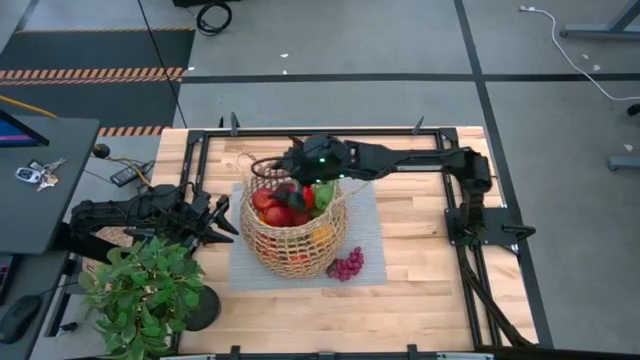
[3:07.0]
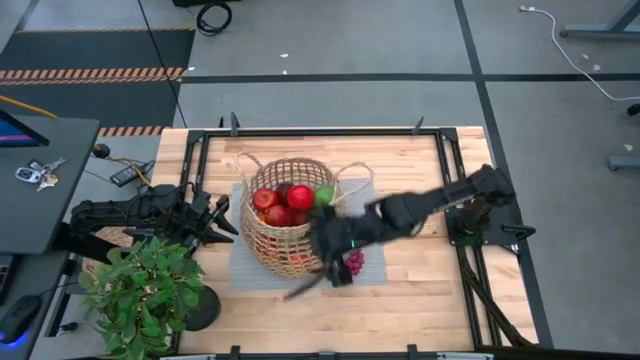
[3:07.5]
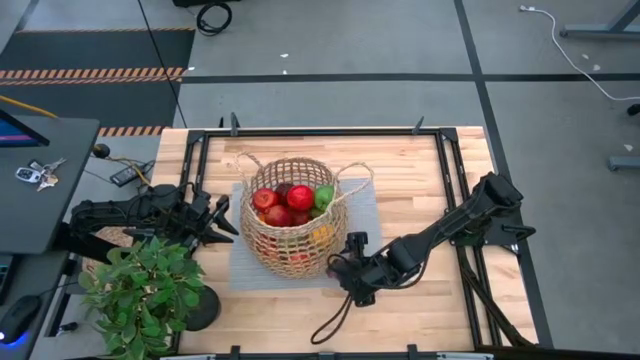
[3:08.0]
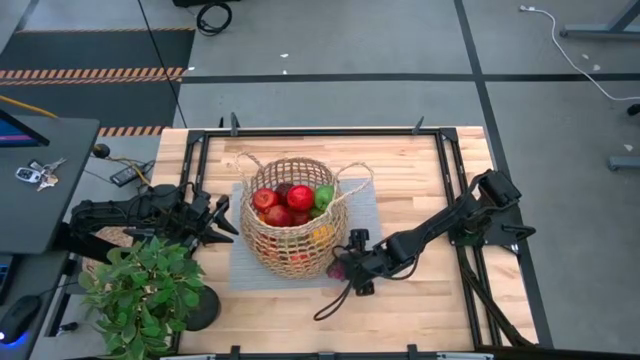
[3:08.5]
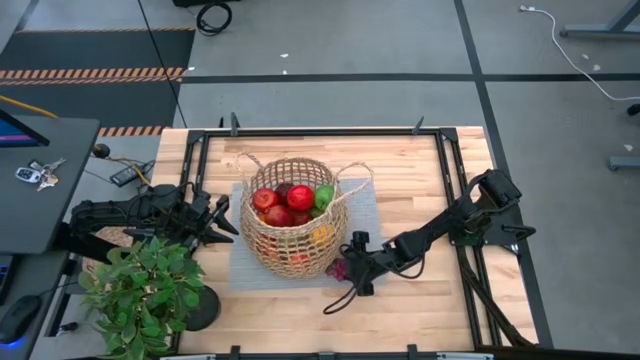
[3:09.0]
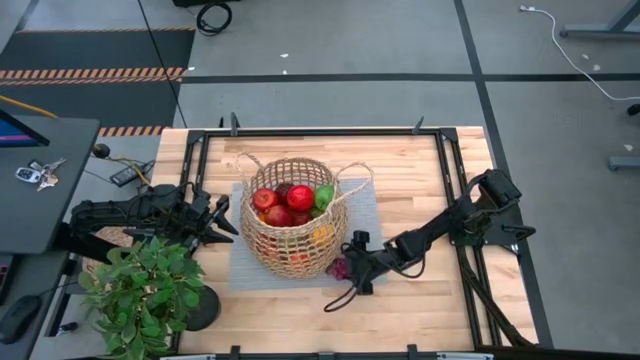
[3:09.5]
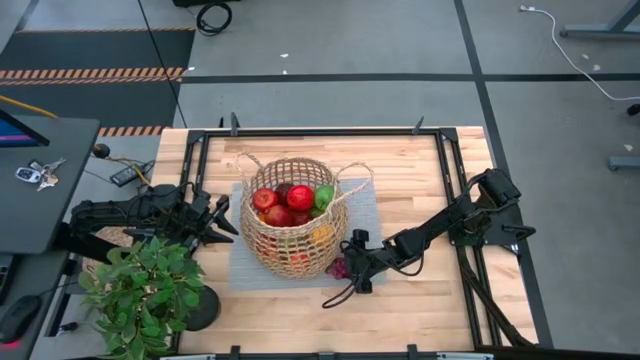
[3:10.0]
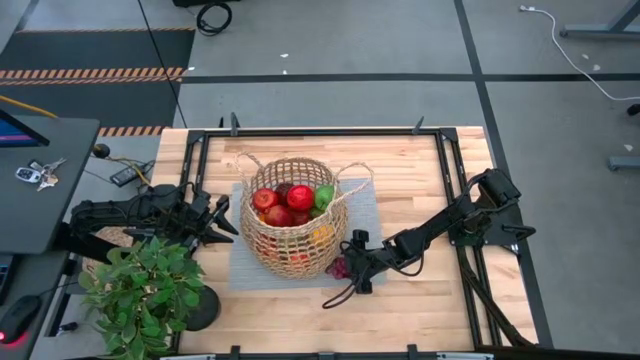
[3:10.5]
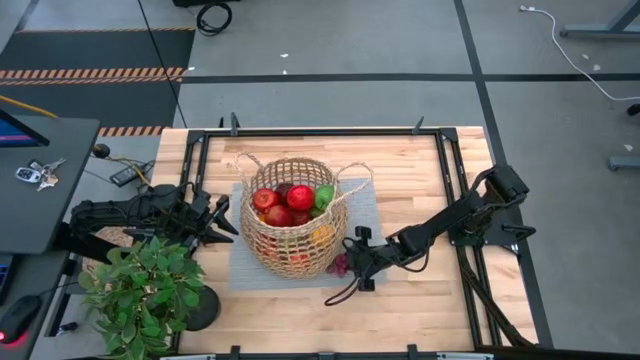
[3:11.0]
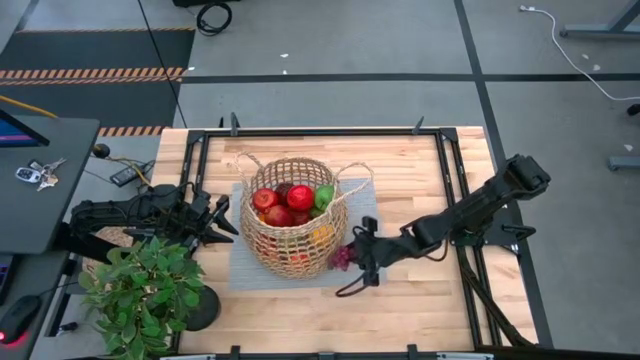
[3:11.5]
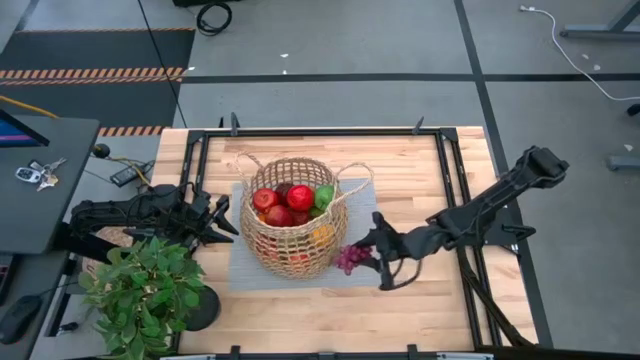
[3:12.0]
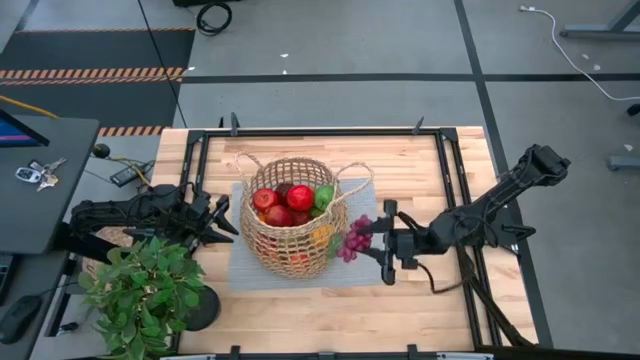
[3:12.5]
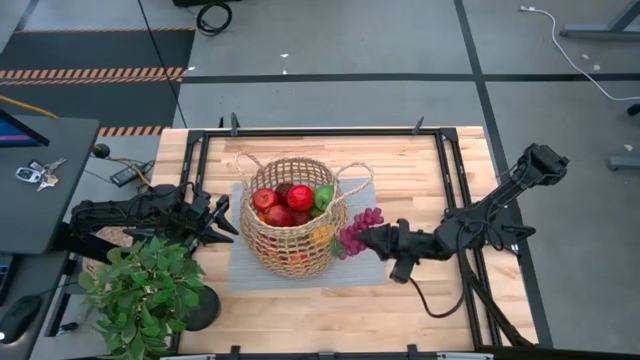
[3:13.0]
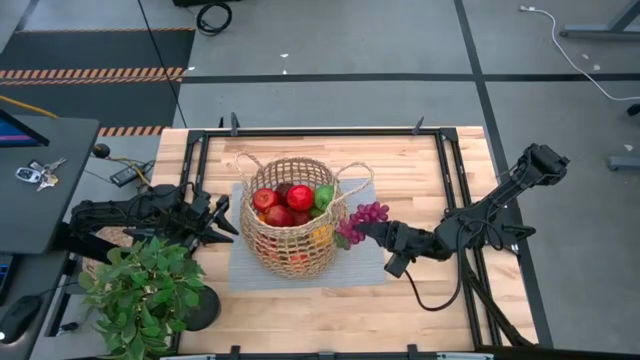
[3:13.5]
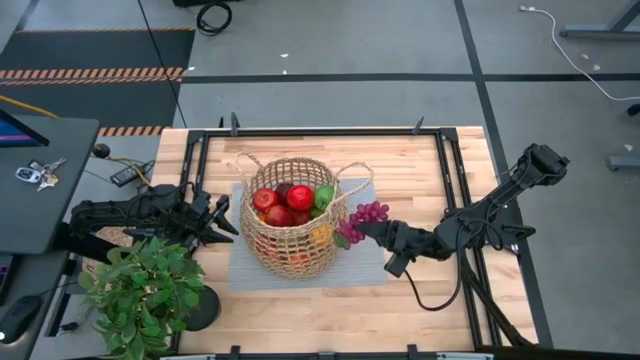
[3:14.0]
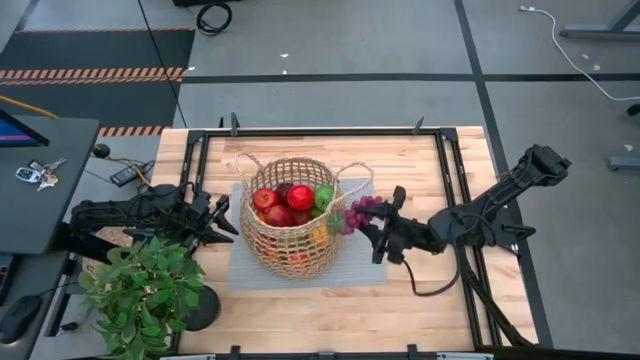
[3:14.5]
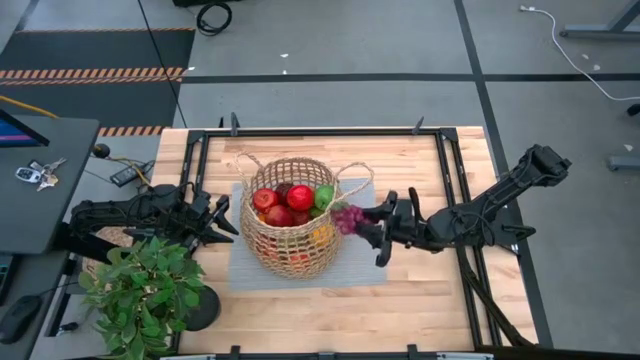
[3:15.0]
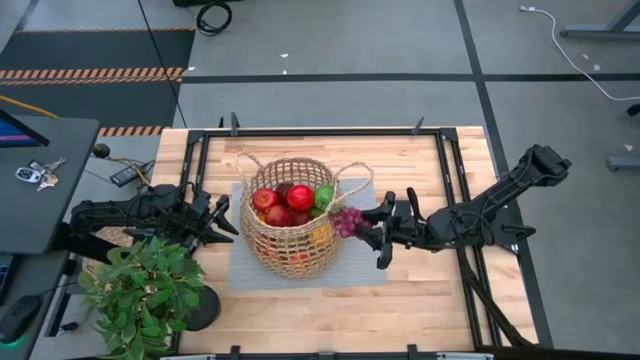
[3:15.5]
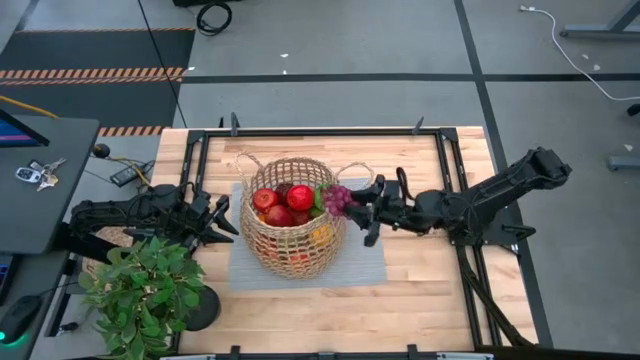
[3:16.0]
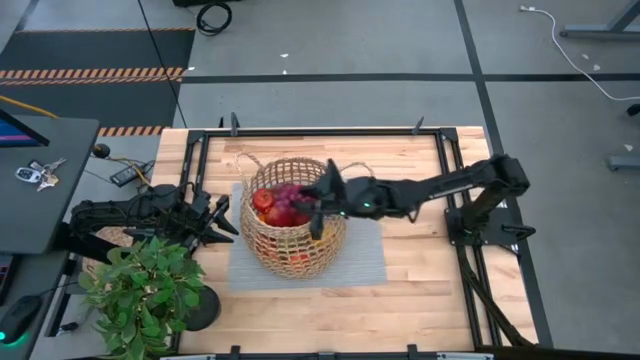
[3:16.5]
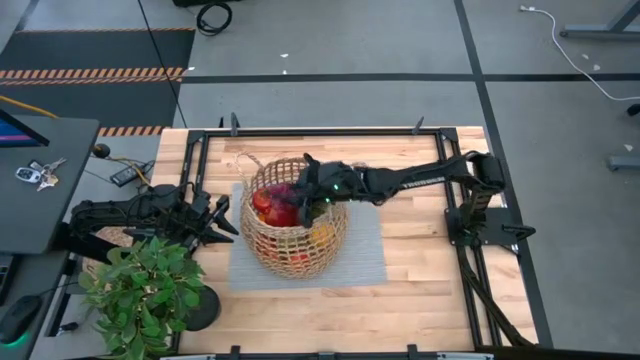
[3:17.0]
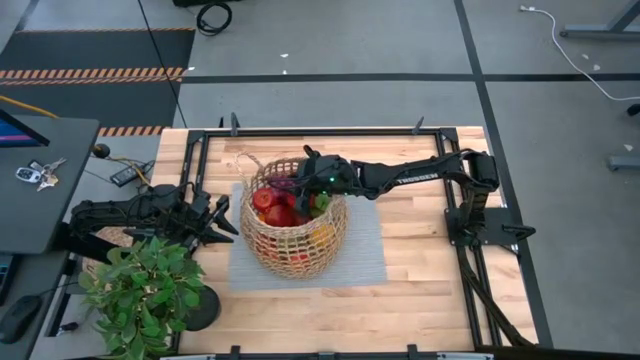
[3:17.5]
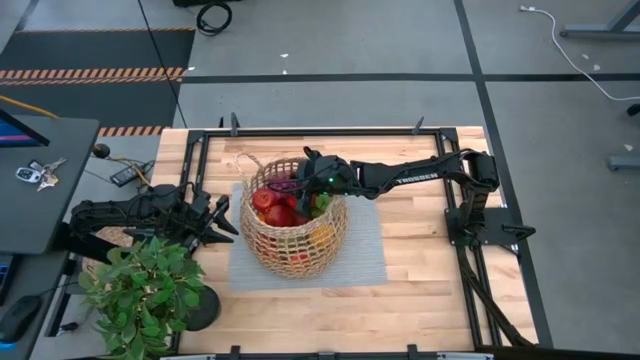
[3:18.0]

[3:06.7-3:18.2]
Task: Build produce basket
Put the grapes into the brown basket

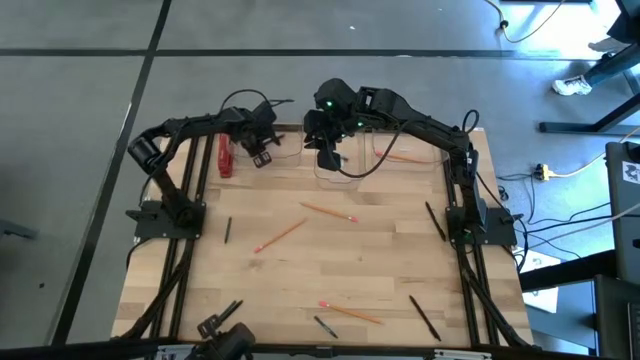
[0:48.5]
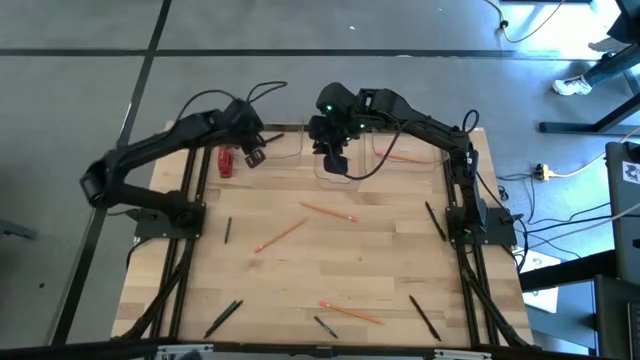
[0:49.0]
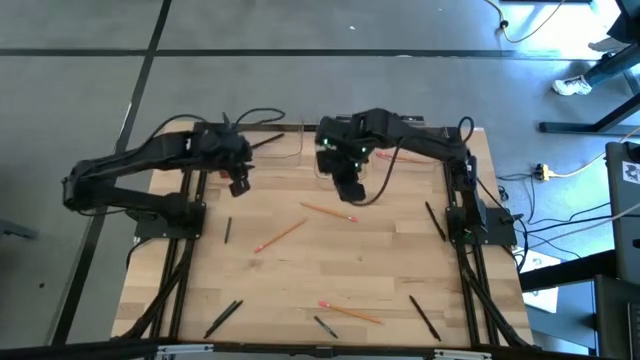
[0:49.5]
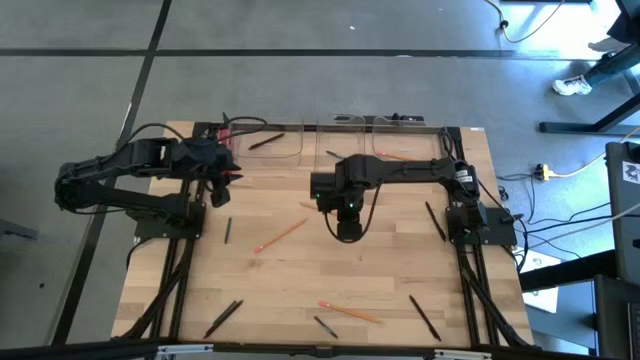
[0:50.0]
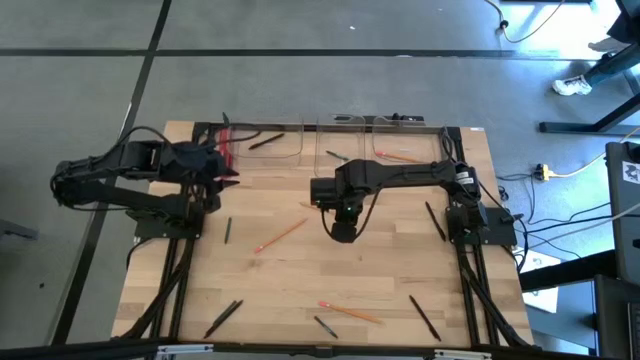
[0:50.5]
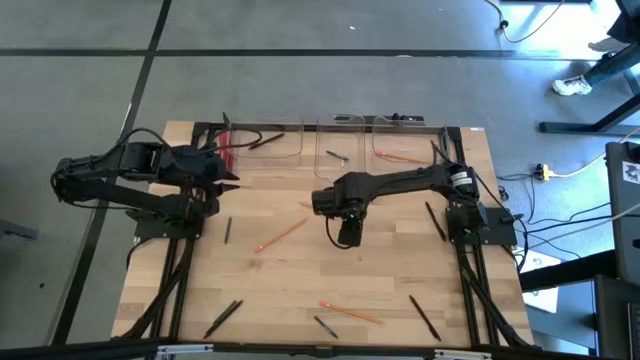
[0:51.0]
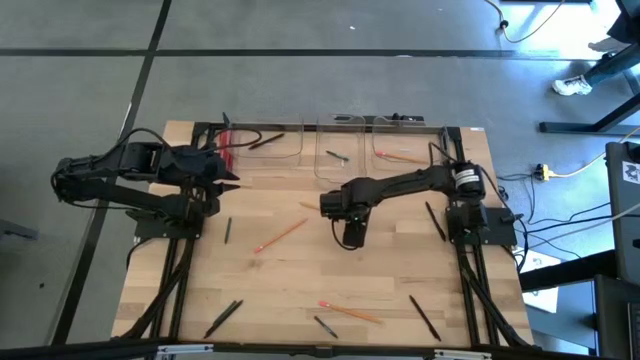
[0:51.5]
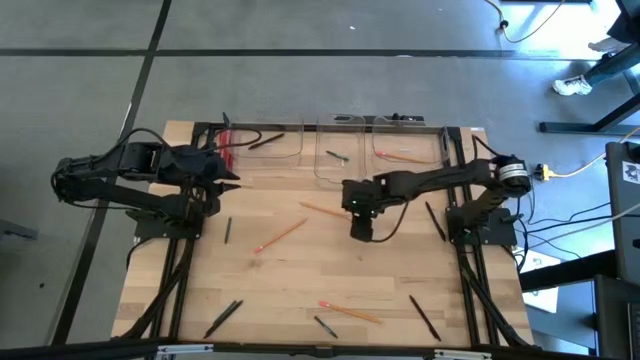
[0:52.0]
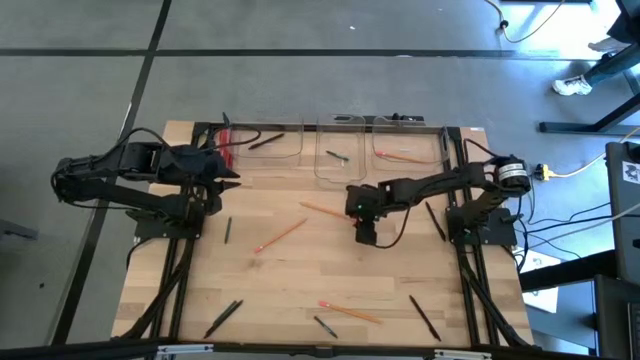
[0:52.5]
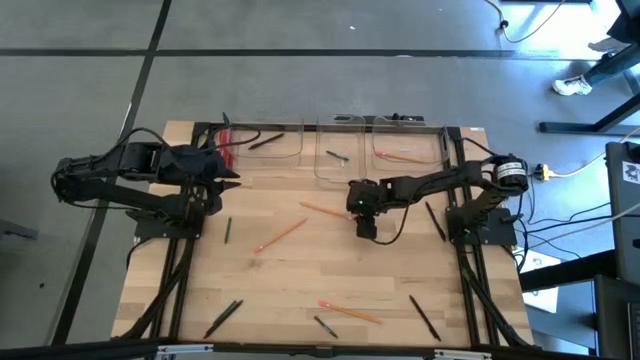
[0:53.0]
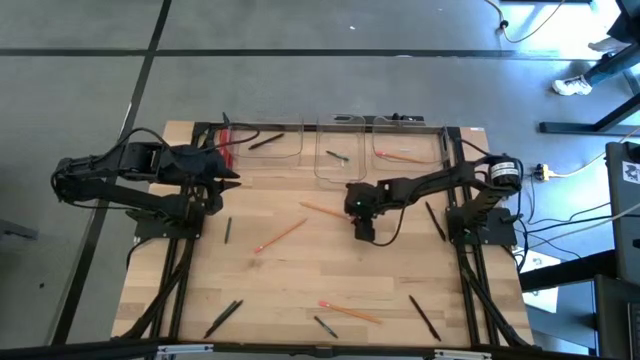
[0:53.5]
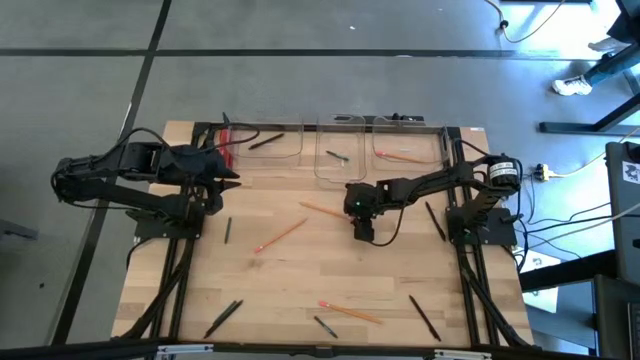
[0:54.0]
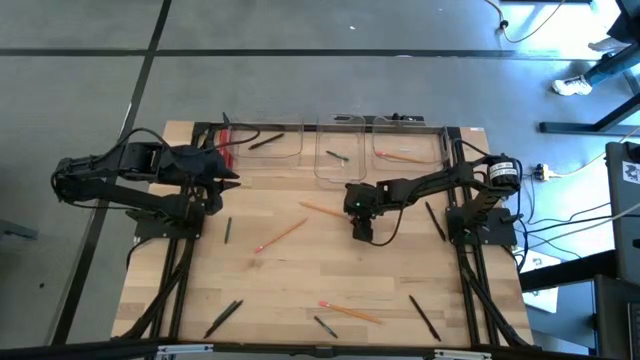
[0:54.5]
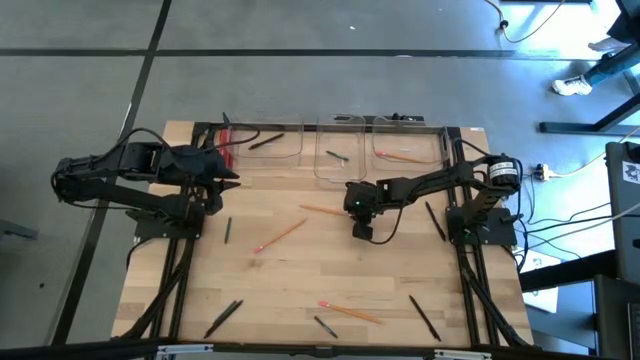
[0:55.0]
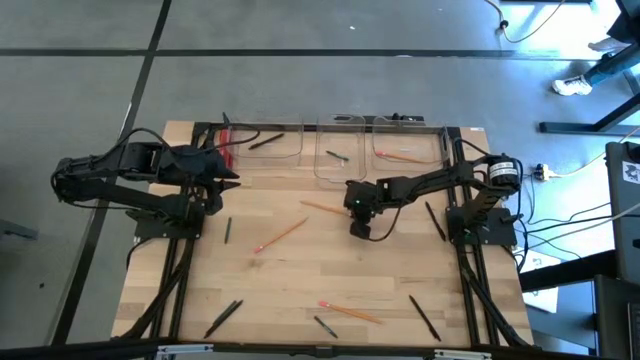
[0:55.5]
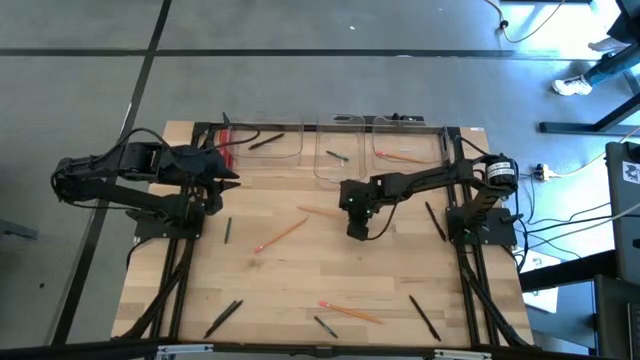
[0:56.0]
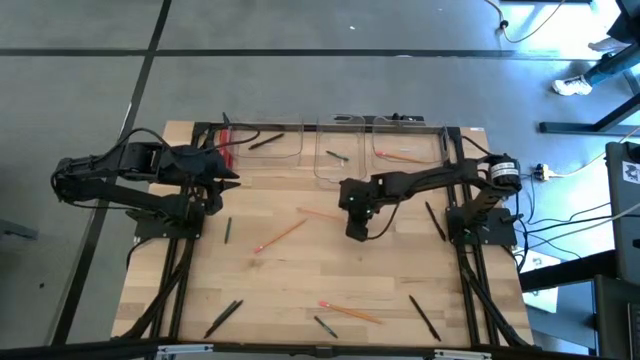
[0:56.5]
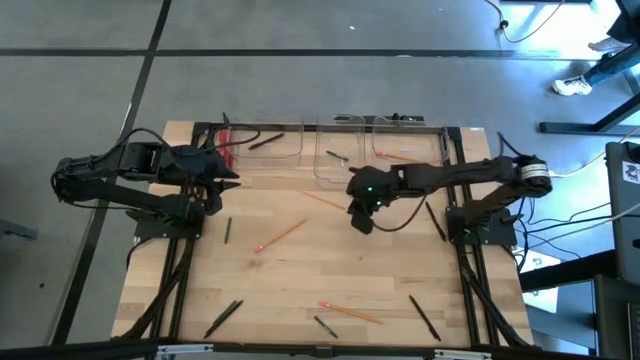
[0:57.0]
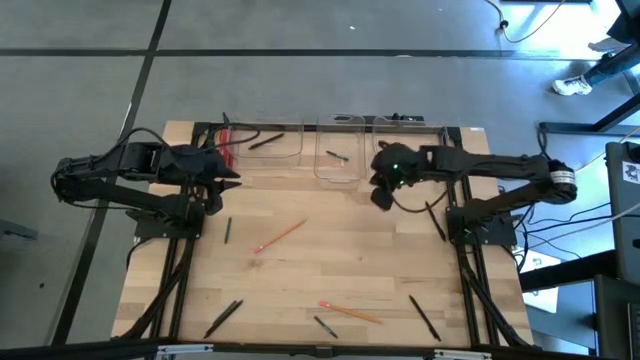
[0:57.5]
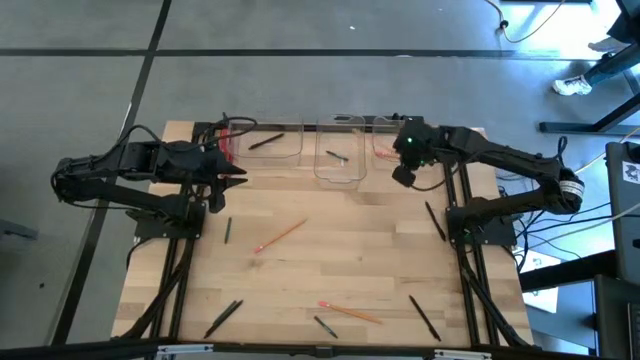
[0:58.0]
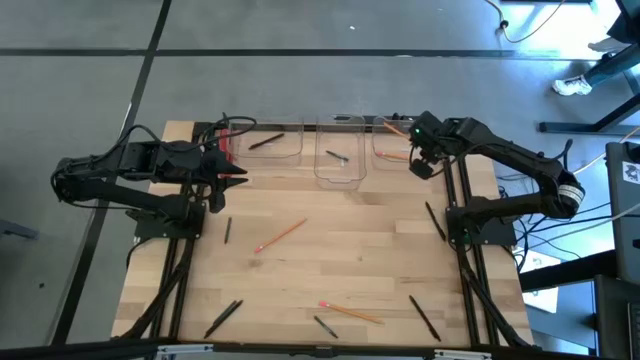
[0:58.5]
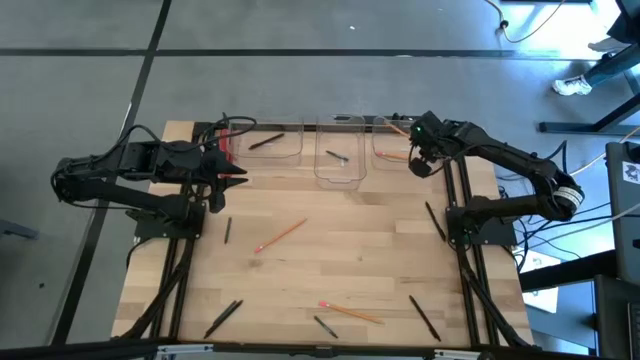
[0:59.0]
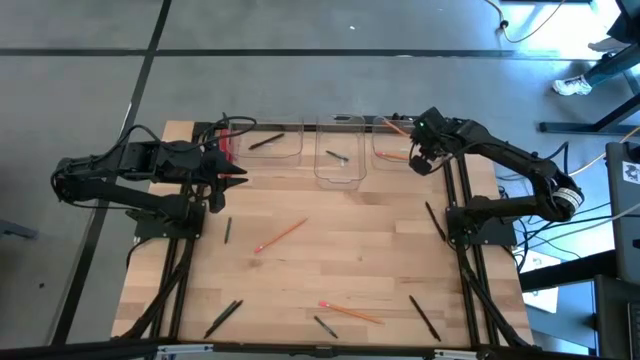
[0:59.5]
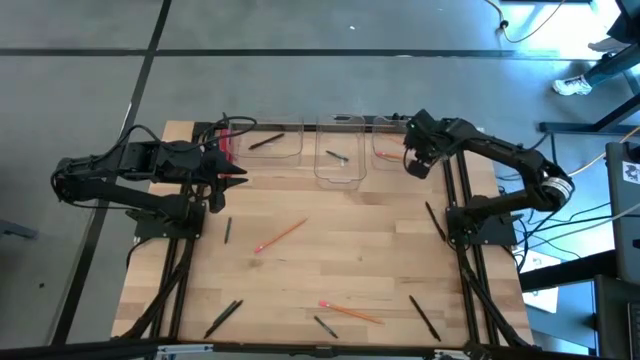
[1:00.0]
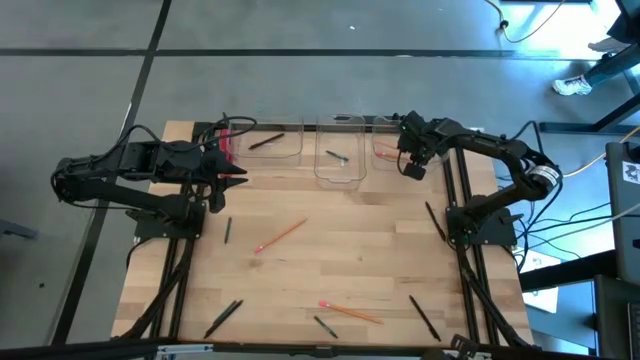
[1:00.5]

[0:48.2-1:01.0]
Task: Sort crayons/erasers/pens/pencils in bins
Put the orange pencil into the right transparent bin
